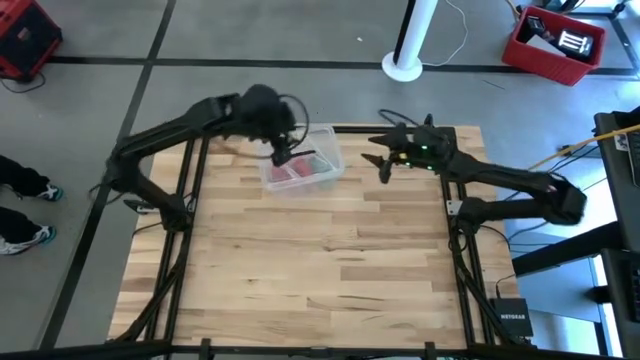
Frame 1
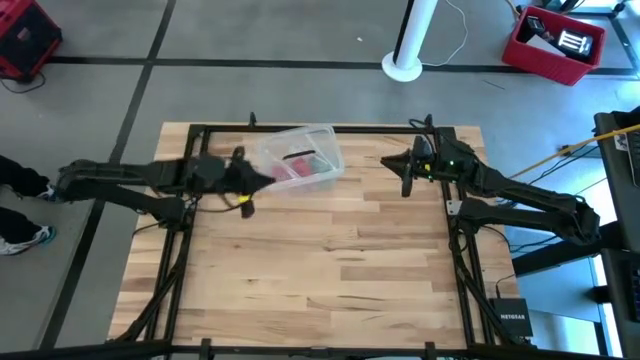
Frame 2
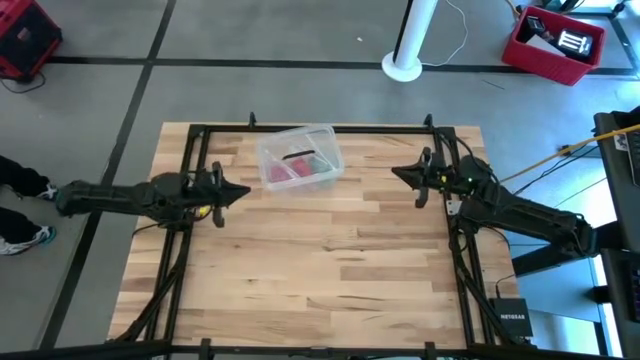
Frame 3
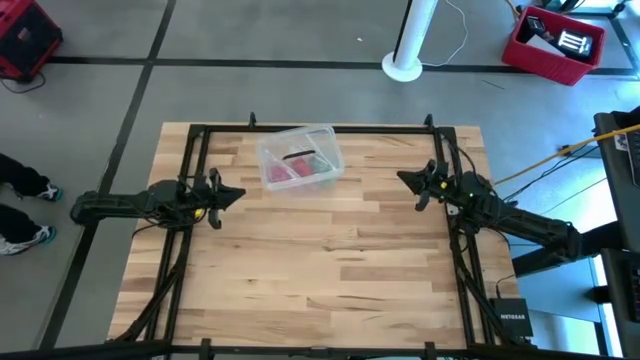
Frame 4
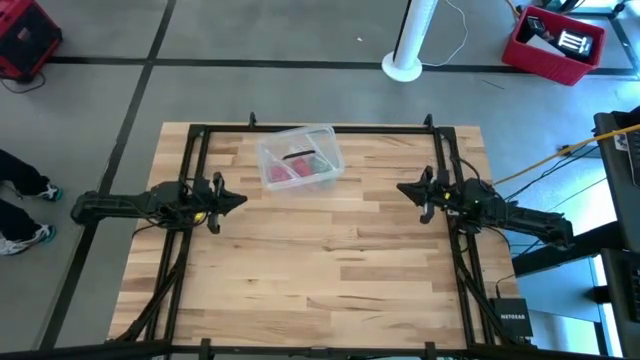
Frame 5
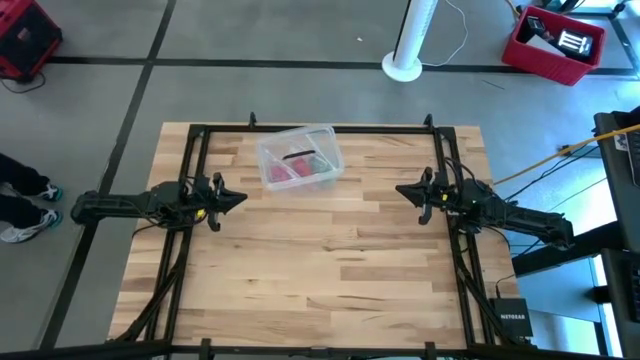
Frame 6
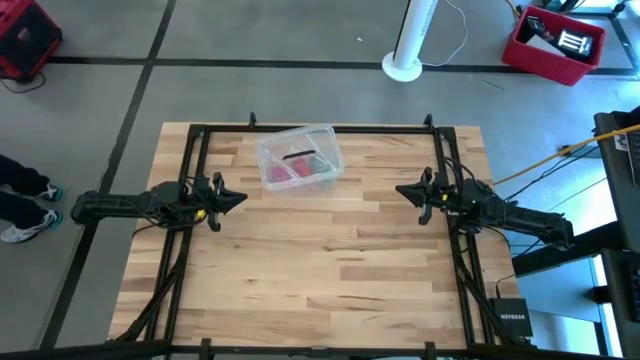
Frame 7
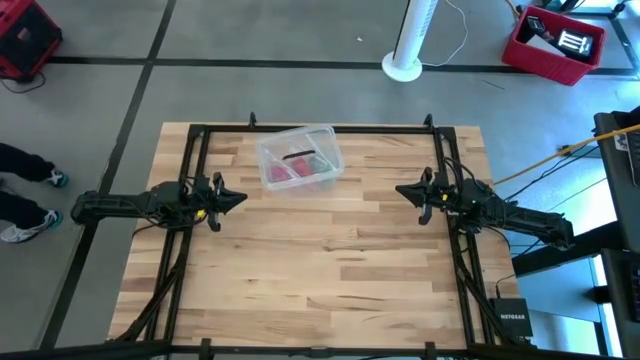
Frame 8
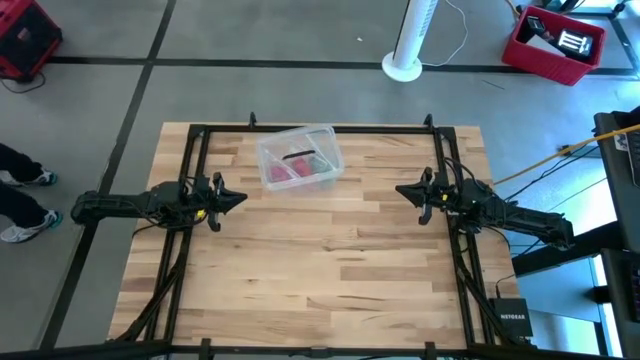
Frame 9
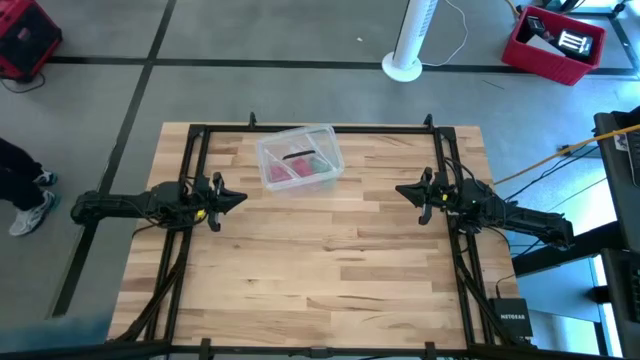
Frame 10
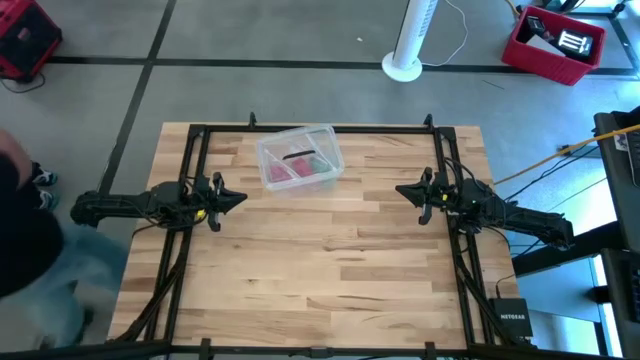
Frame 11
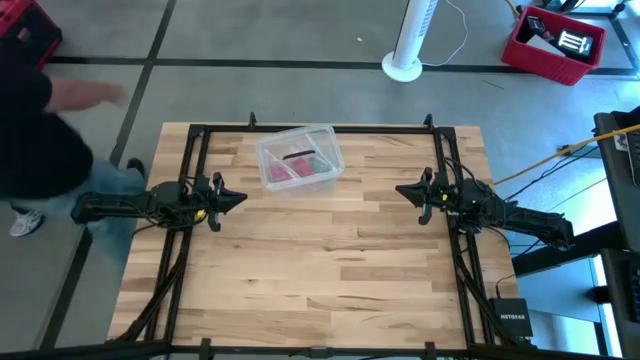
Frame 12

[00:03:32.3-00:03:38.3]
Task: Roll bandage
Return to Home Position

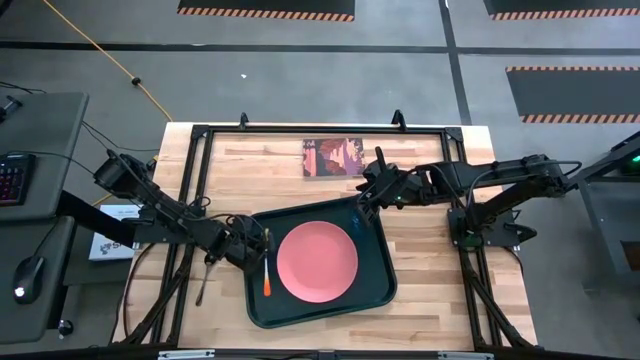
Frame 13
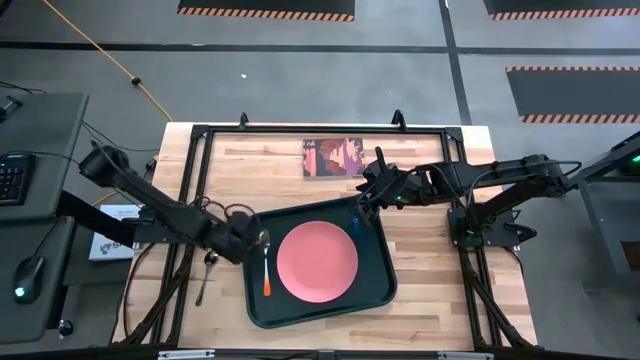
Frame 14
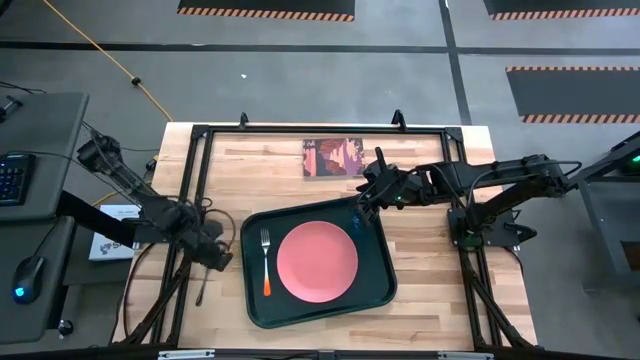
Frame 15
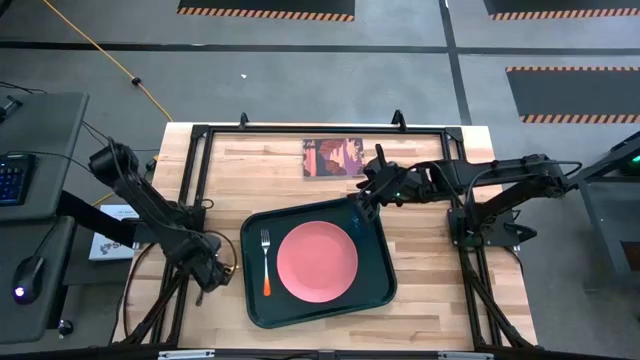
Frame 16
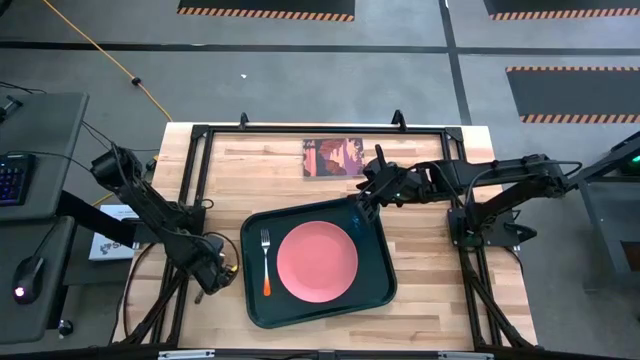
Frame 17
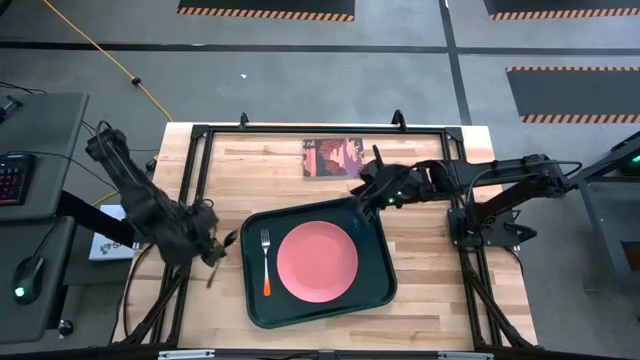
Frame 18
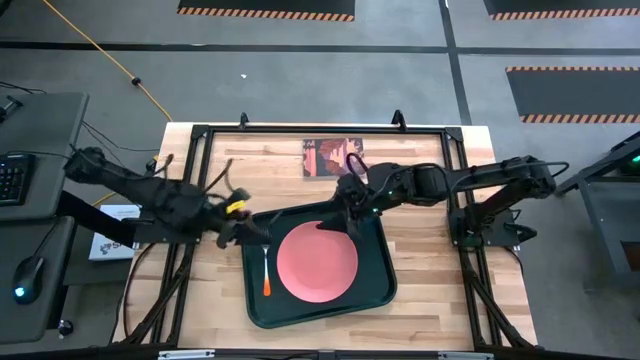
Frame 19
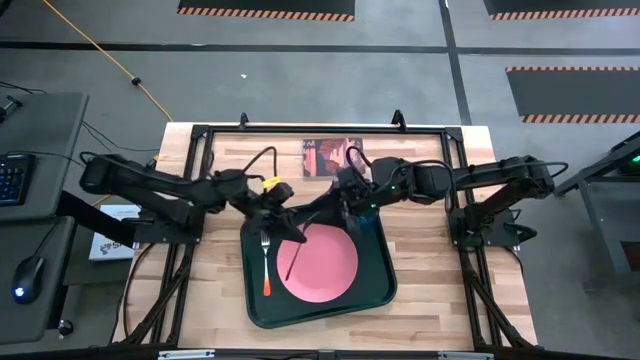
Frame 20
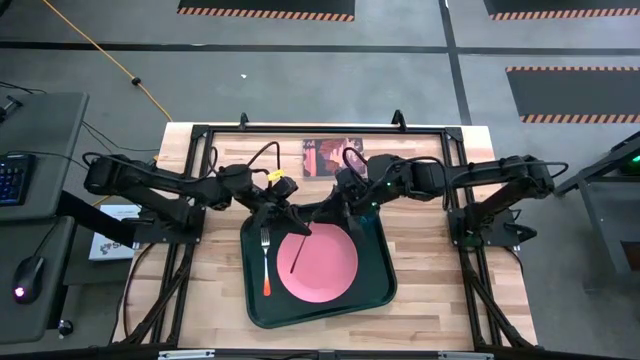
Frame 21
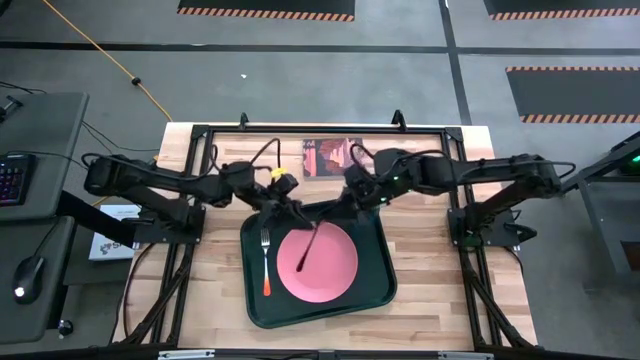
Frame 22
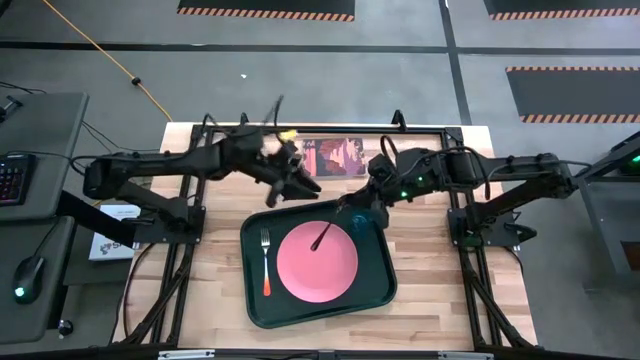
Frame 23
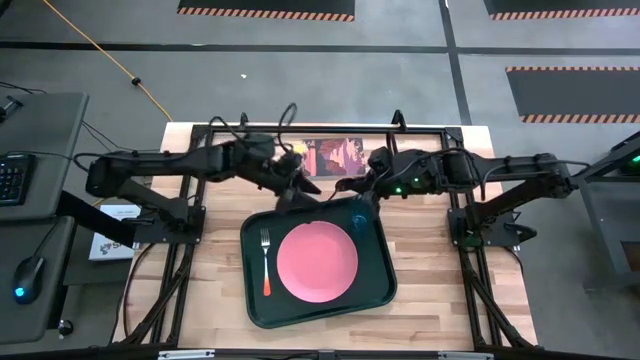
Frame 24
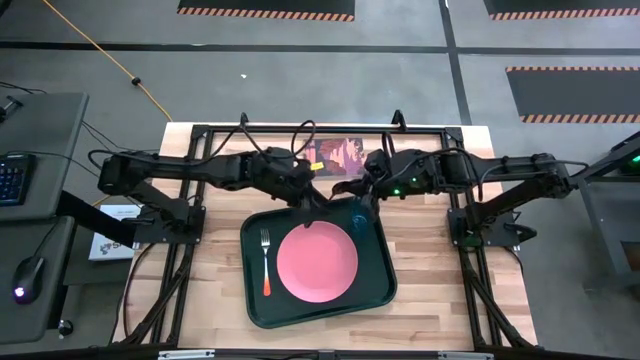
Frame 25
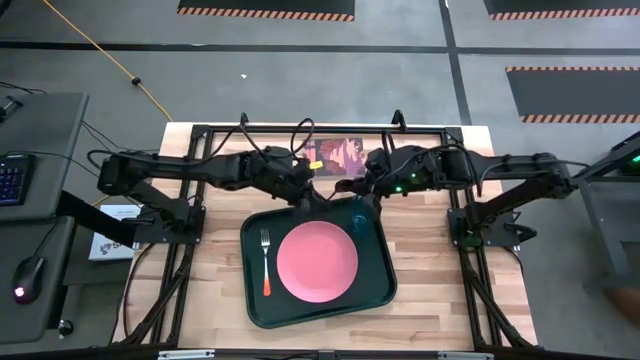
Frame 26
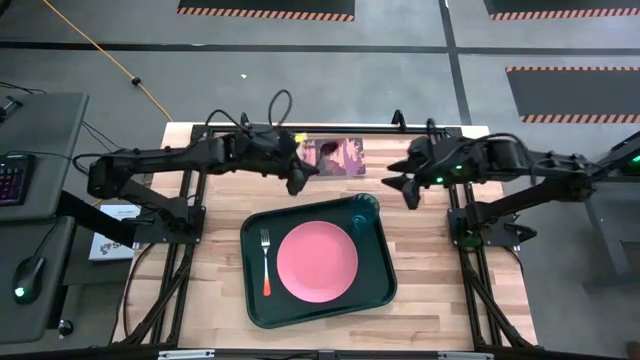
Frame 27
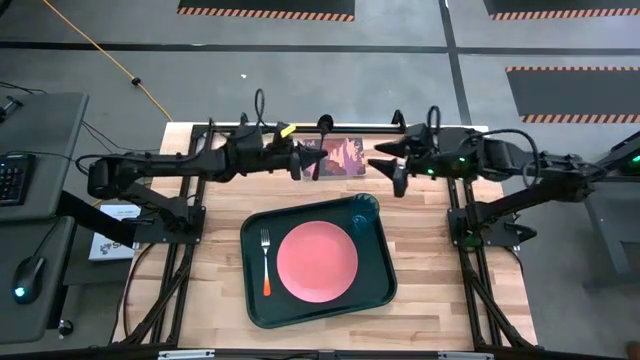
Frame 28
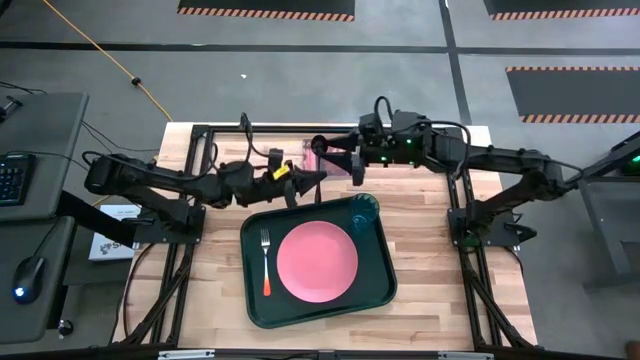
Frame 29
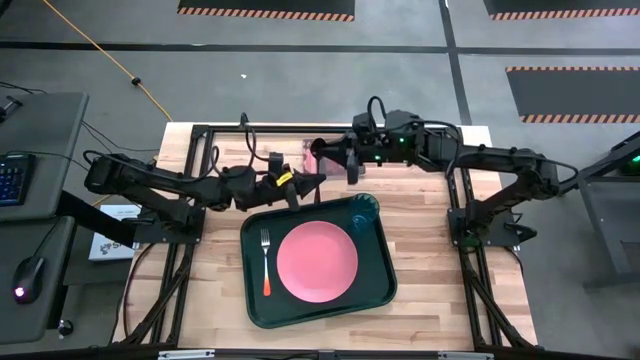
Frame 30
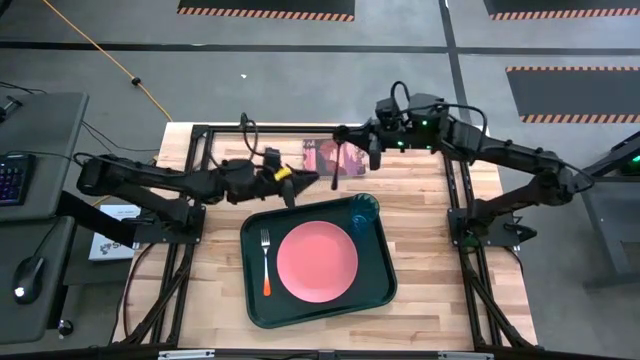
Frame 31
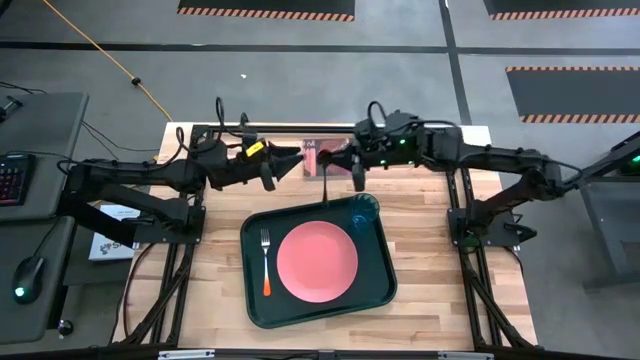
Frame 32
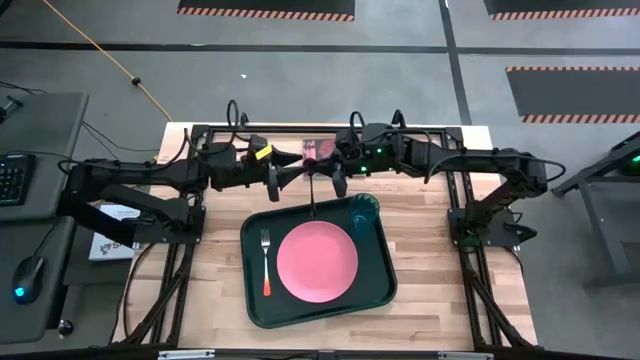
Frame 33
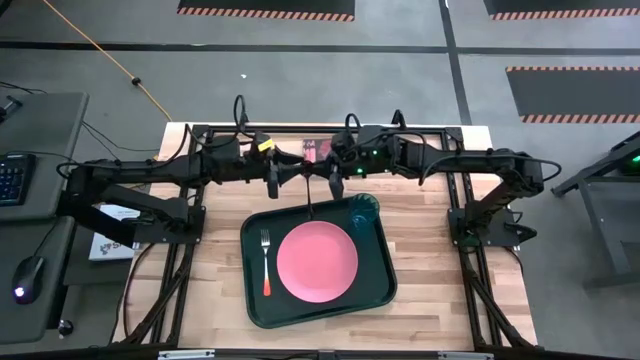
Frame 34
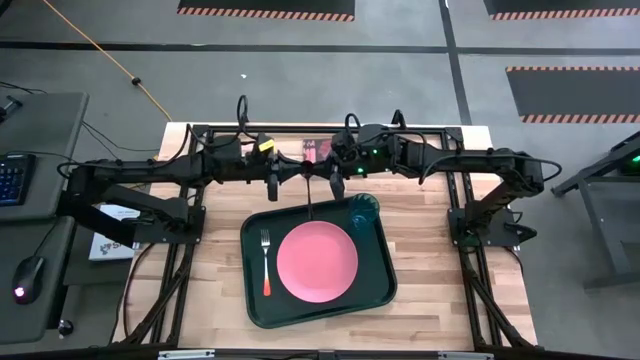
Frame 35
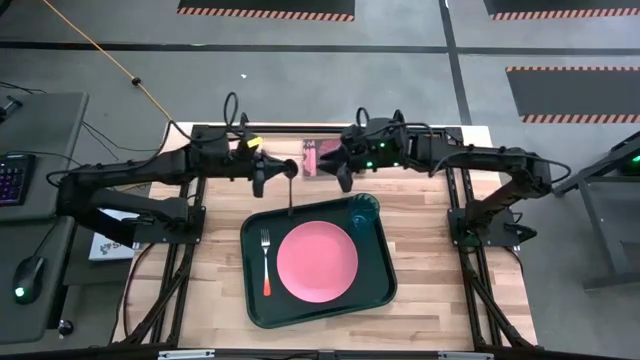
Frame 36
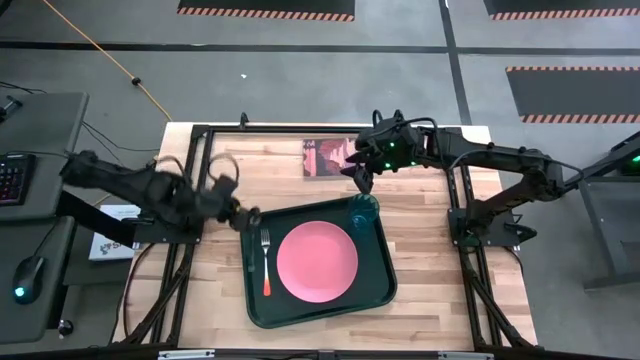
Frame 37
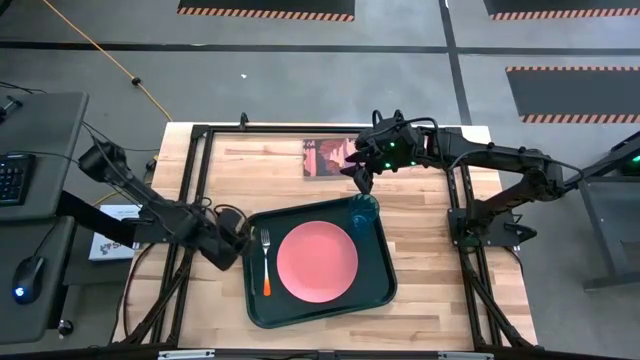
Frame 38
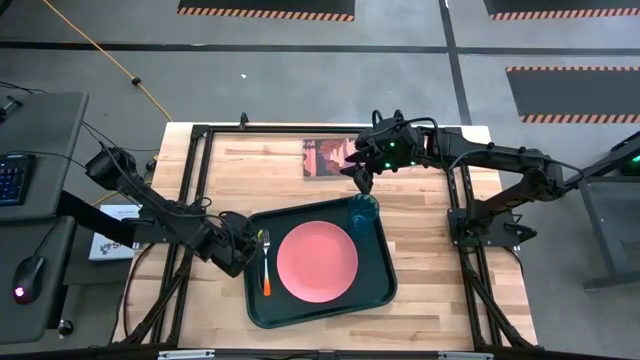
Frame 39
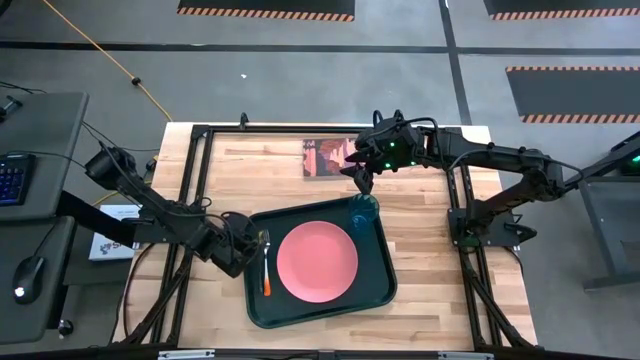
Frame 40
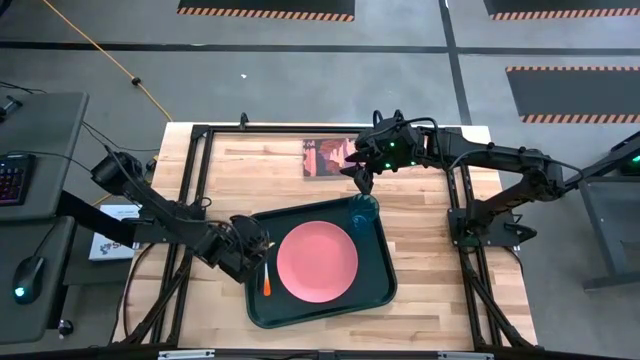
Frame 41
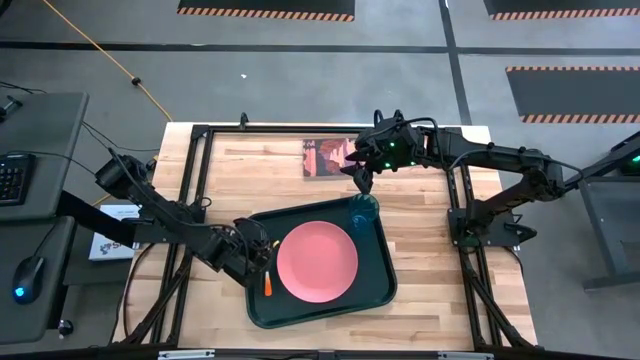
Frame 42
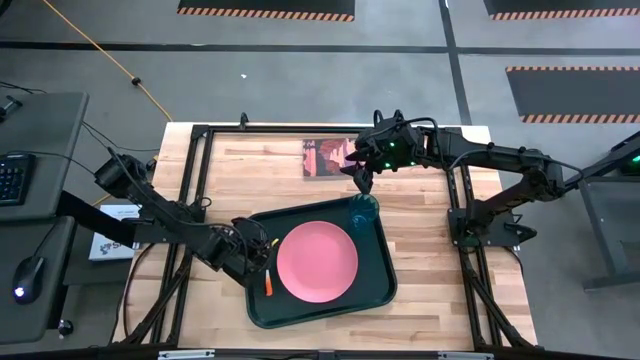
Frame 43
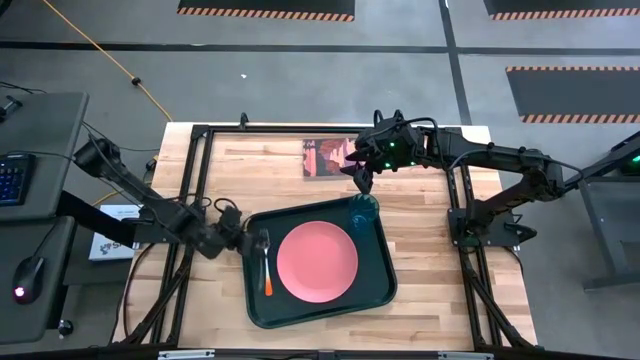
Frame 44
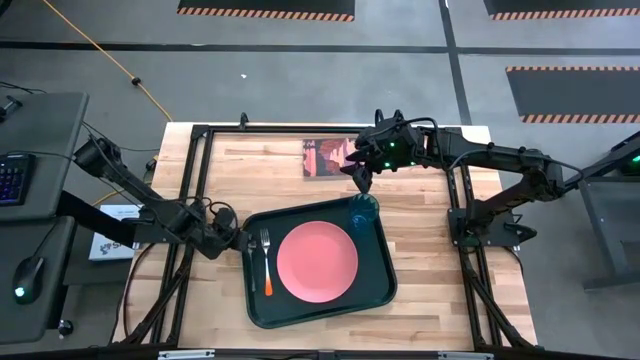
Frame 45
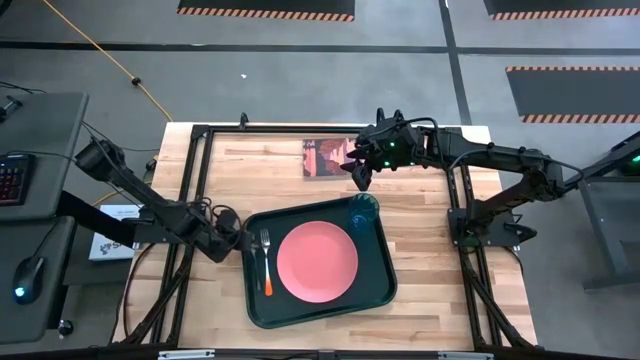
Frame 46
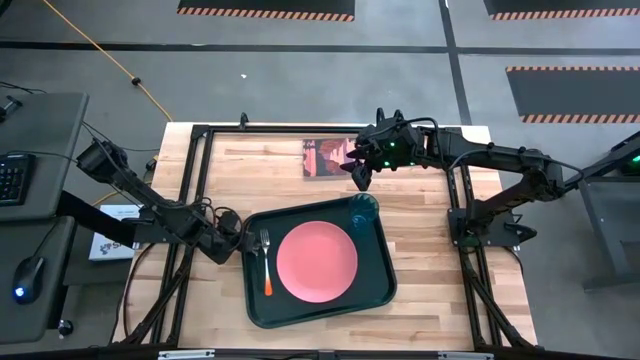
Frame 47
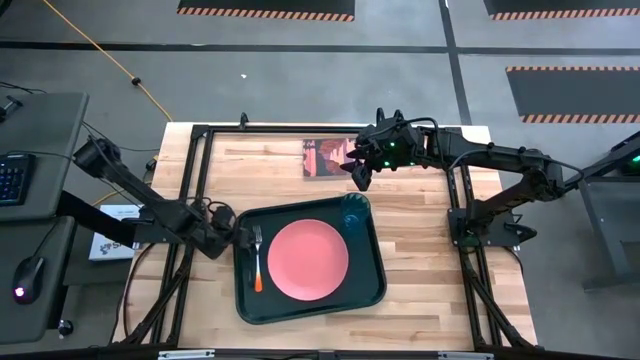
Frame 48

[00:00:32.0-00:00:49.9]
Task: Pick and place plate/cup/fork/spoon on tray
Put the black spoon to the left side of the orange fork on the black tray
